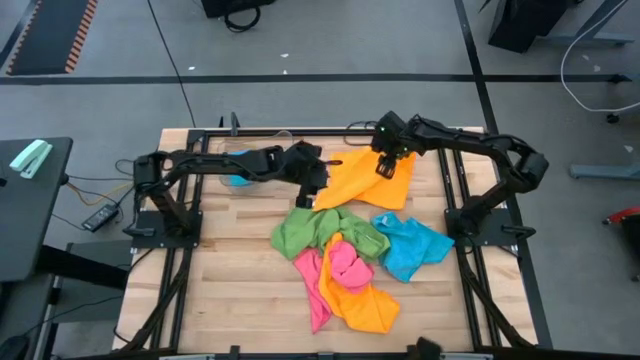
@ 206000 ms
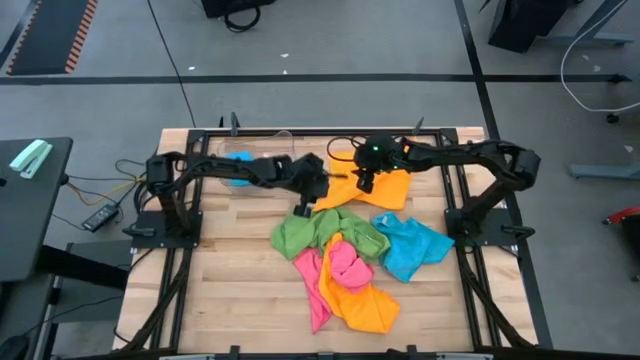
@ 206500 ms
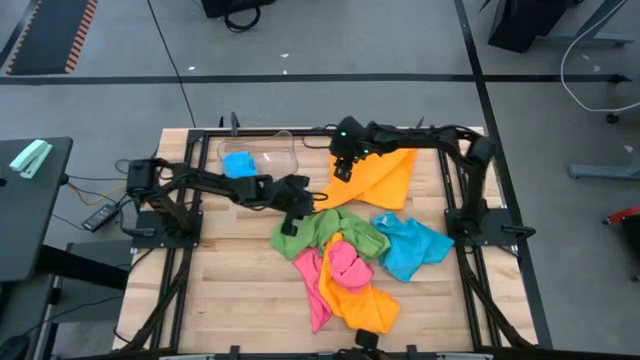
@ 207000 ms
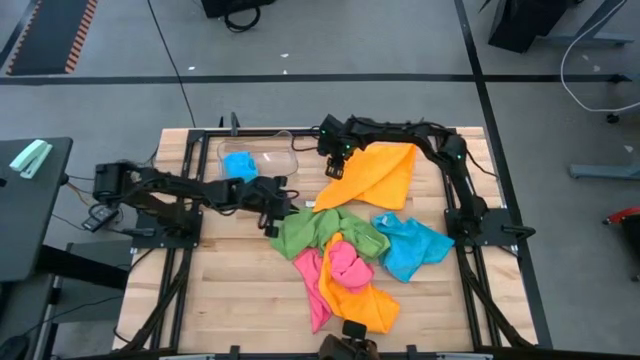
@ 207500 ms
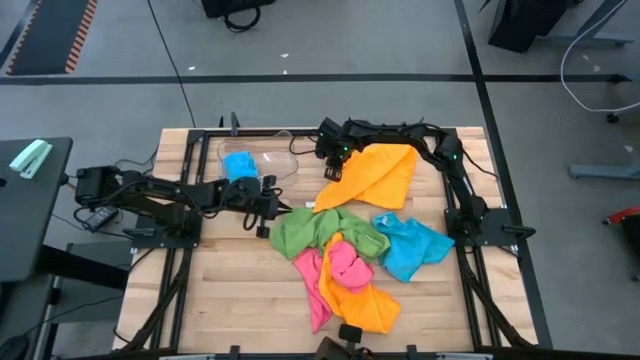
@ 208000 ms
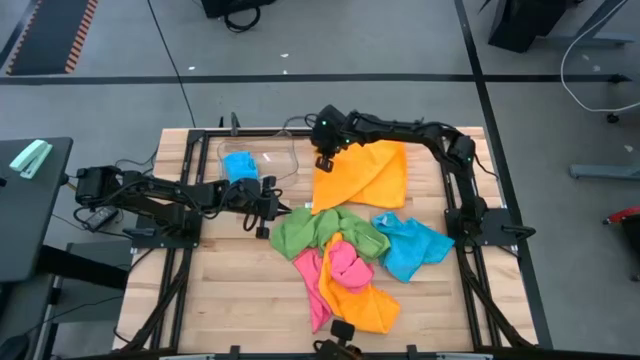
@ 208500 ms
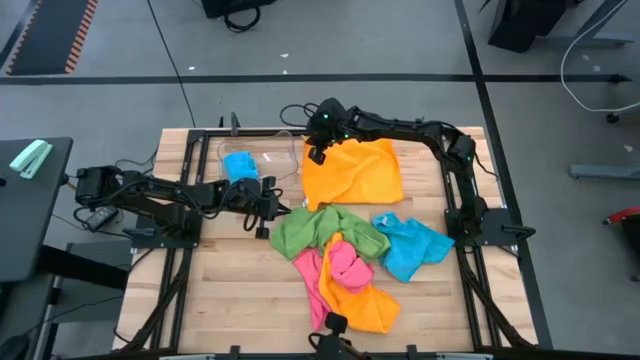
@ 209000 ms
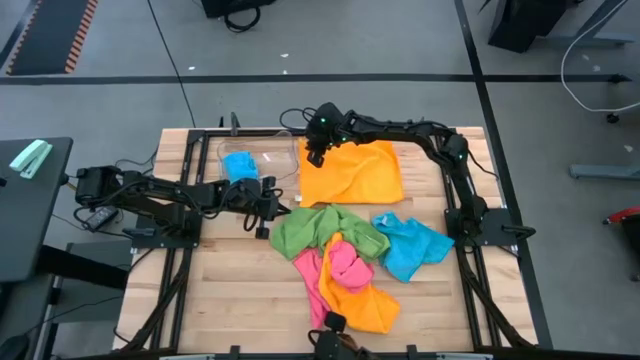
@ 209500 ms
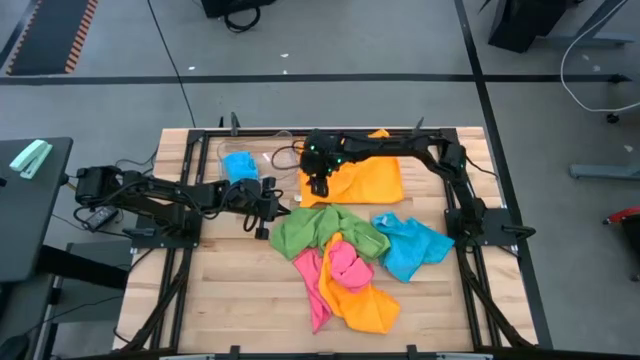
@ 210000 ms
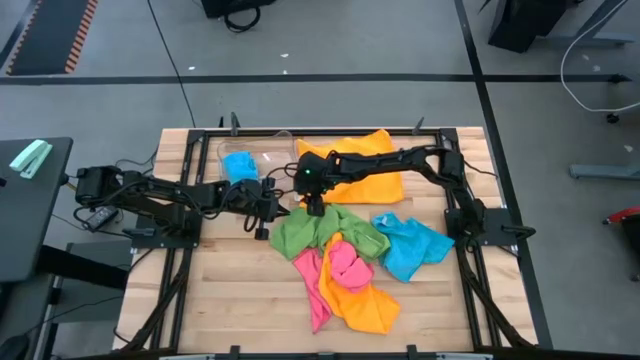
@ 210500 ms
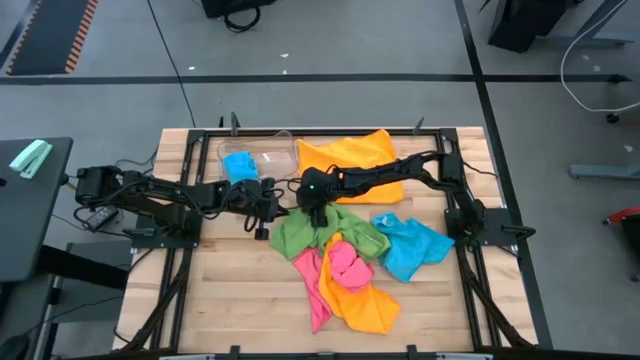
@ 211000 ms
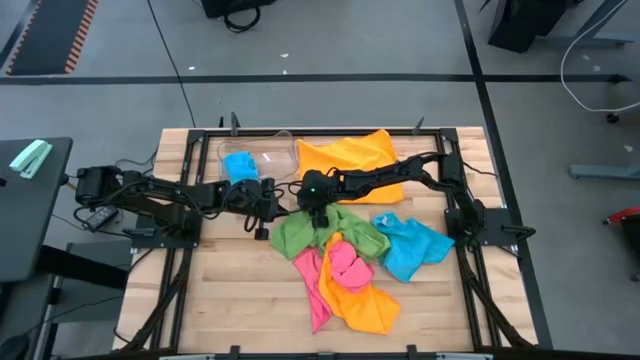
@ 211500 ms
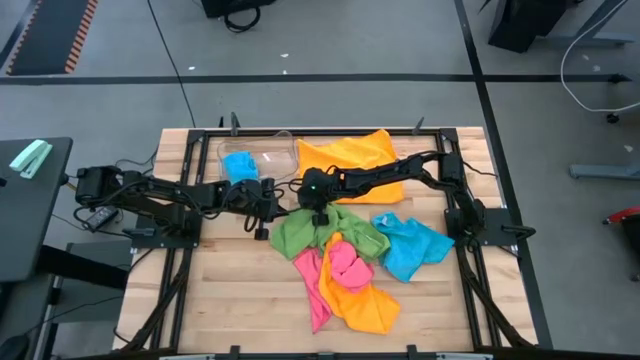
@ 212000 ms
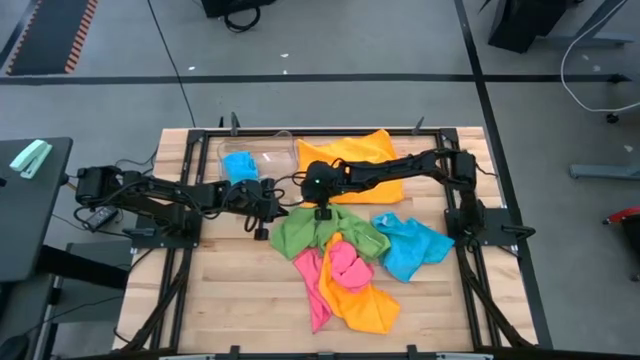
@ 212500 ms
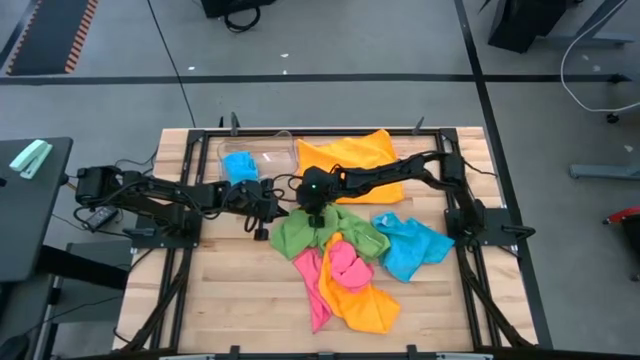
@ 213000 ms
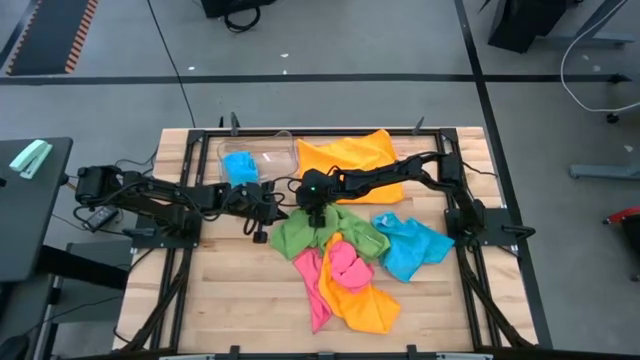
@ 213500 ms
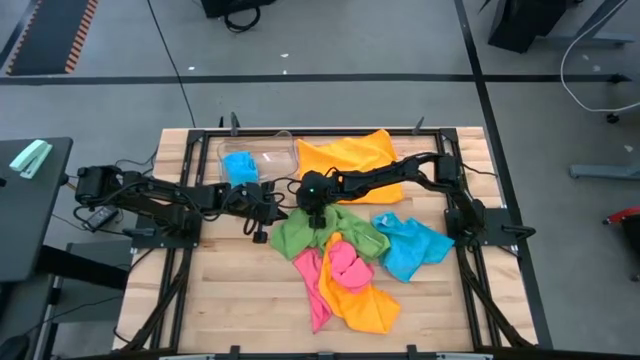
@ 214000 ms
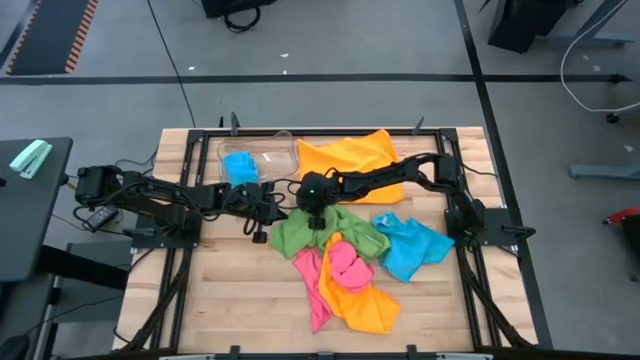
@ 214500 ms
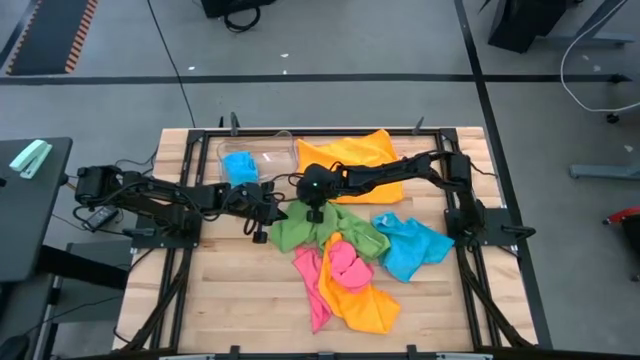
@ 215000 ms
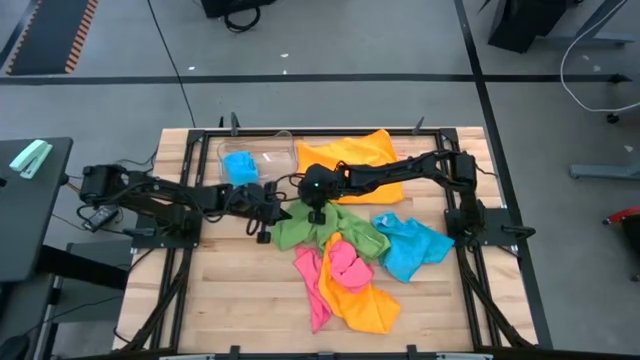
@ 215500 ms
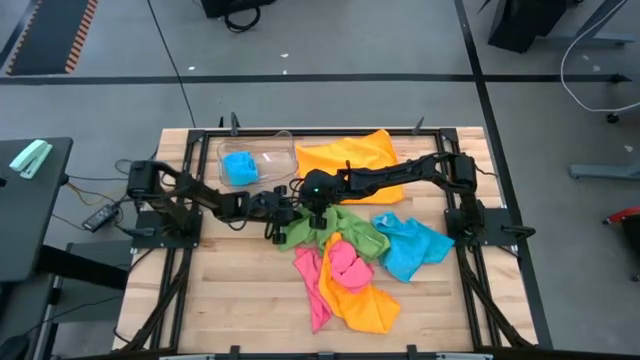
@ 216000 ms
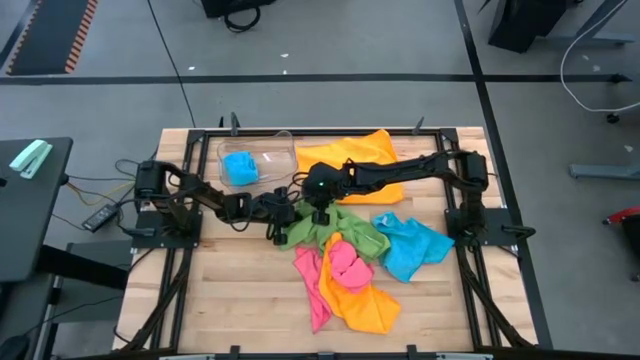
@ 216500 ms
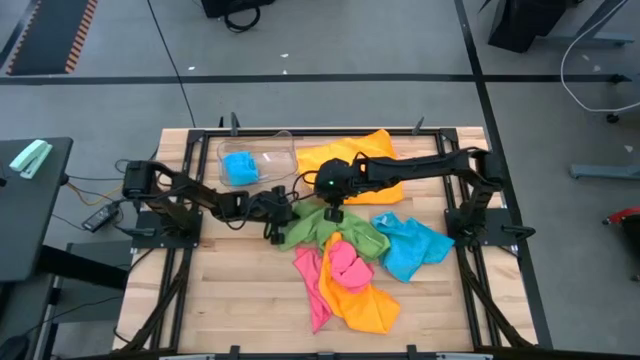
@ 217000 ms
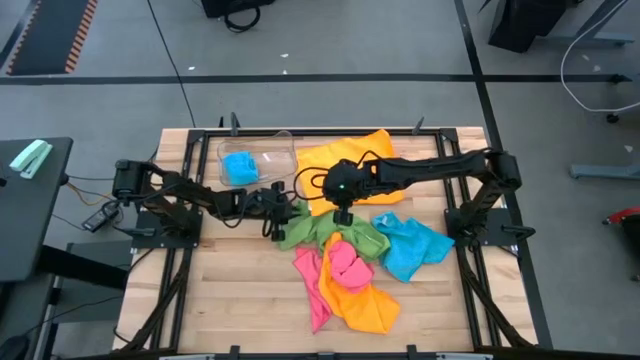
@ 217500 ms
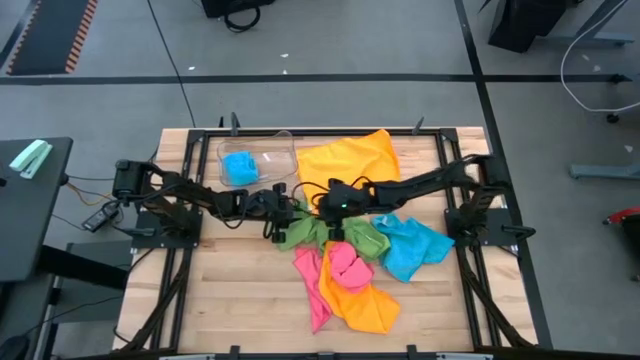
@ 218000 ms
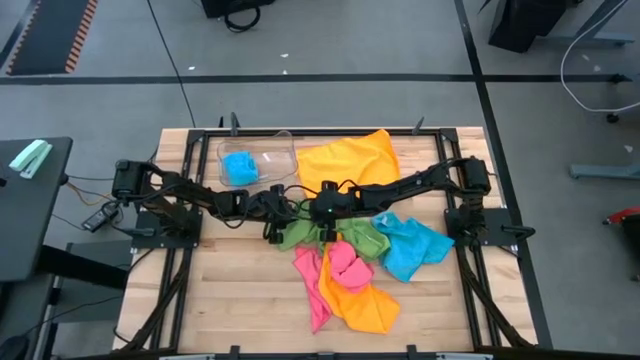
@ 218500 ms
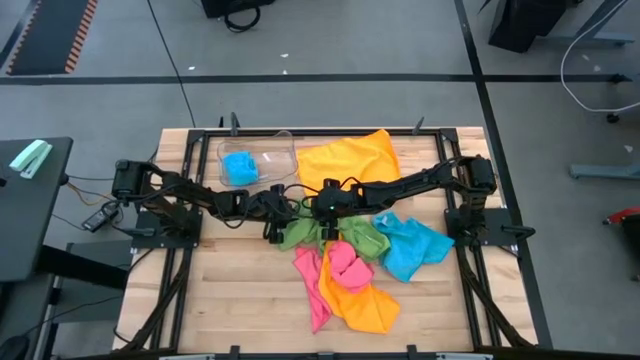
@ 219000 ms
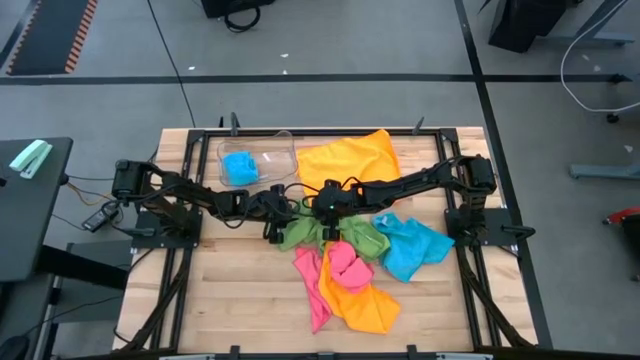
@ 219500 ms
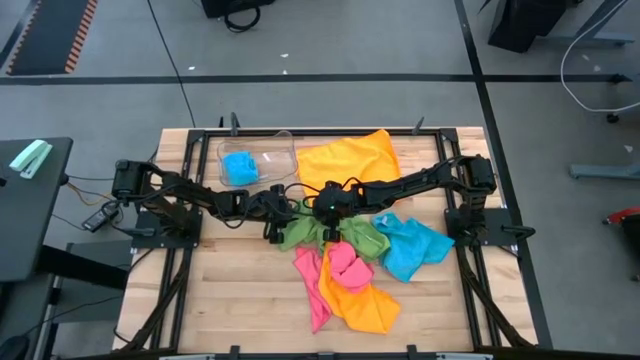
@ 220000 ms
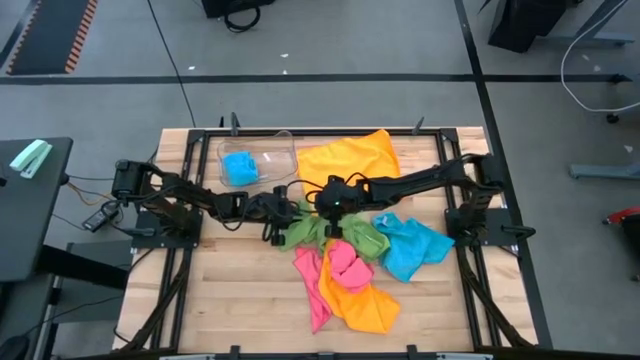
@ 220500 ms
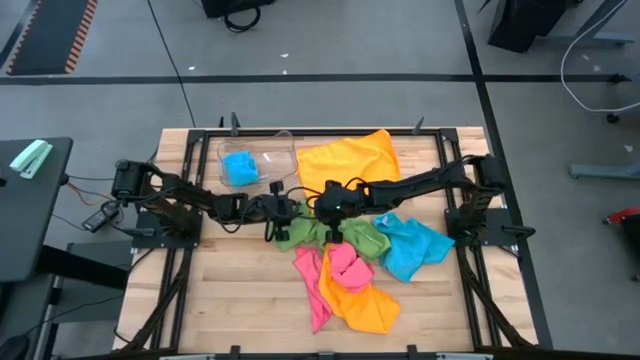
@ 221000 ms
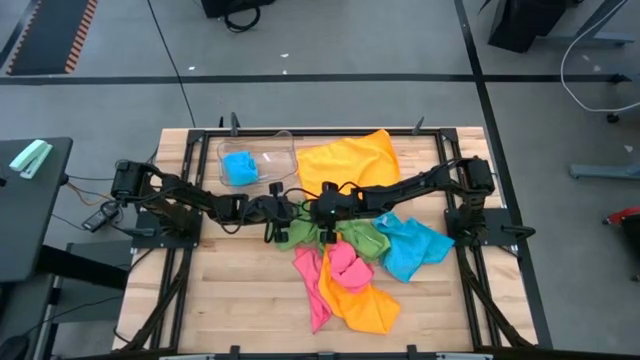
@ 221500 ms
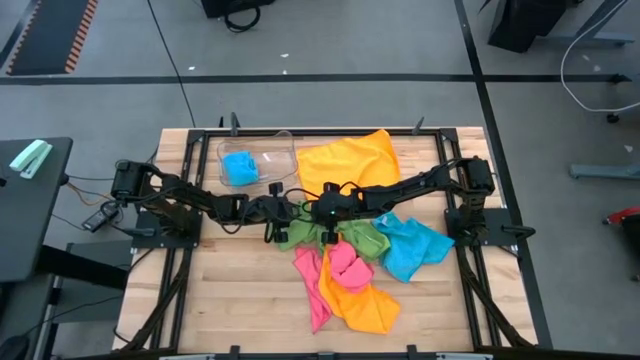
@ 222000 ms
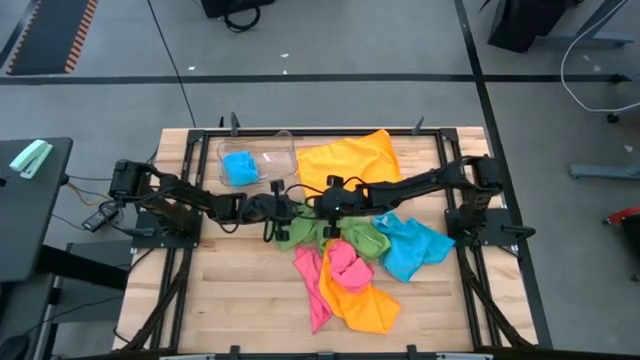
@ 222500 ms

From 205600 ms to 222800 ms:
Task: Fold microfiber towels
Fold the top orange microfiber towel

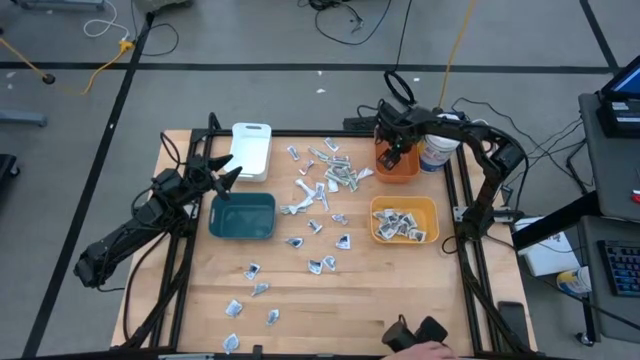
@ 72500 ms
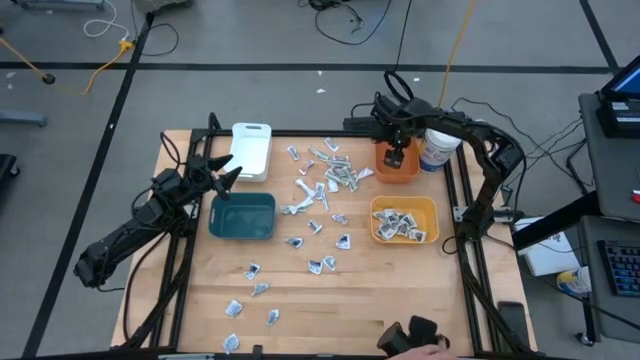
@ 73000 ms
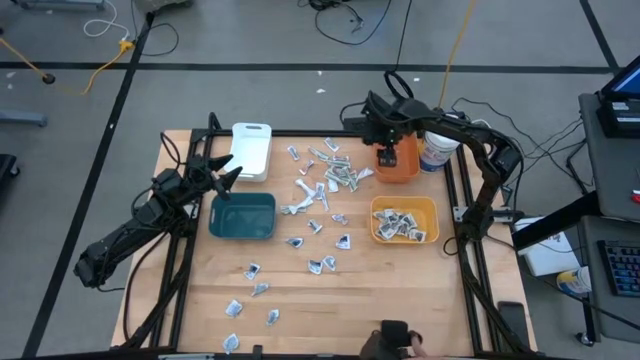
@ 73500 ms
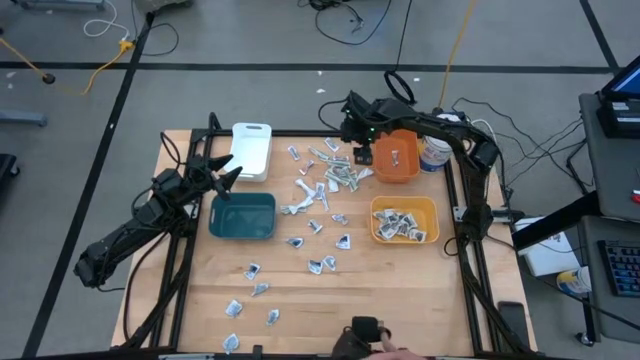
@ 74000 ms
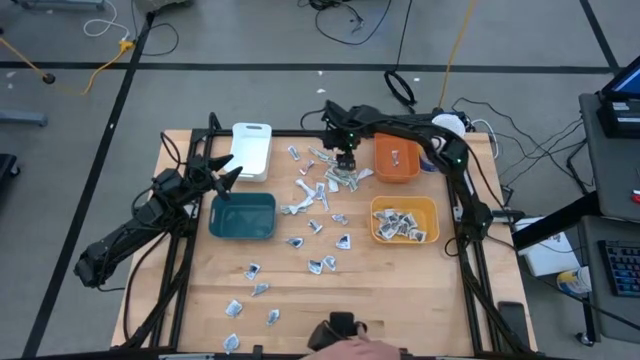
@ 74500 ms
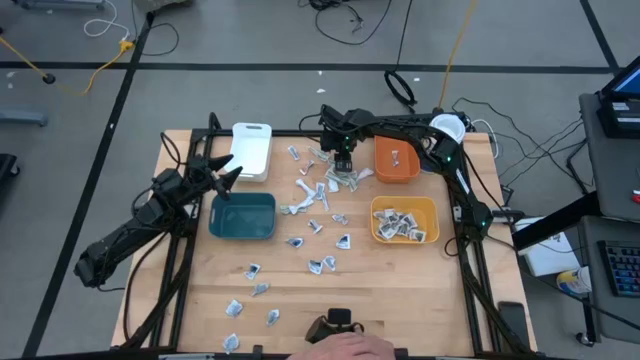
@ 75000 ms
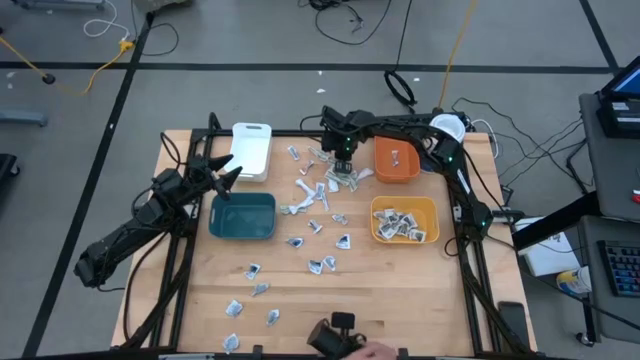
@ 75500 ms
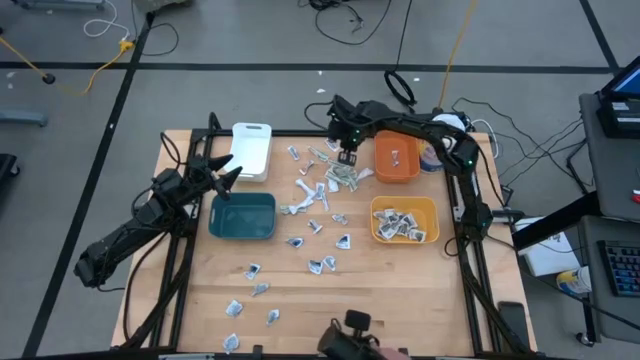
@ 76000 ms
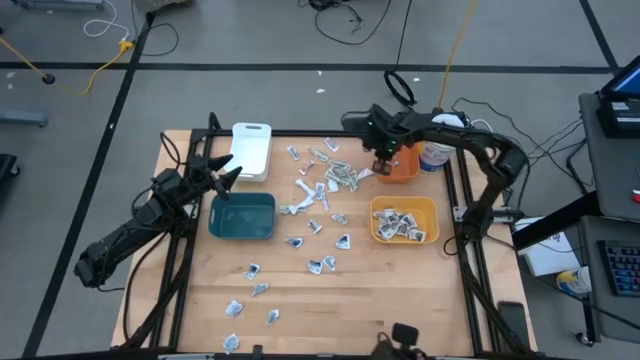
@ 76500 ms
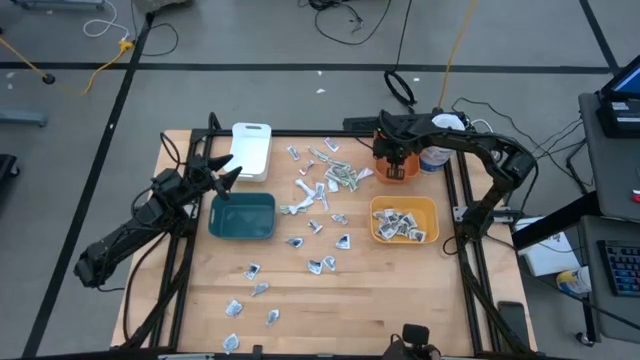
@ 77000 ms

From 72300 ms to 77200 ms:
Task: Pick & Place First Aid Supplies
Put the antibiotic ointment into the orange bin
